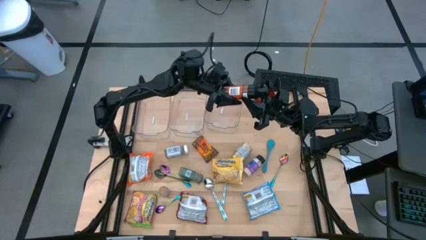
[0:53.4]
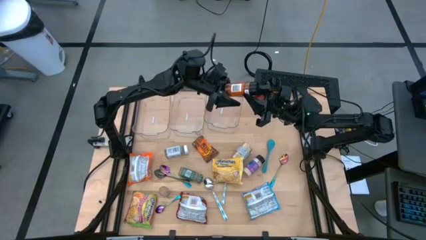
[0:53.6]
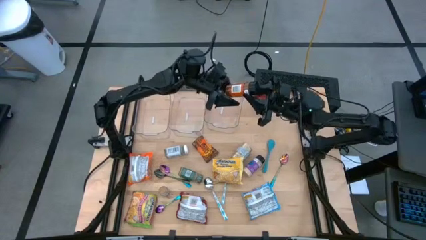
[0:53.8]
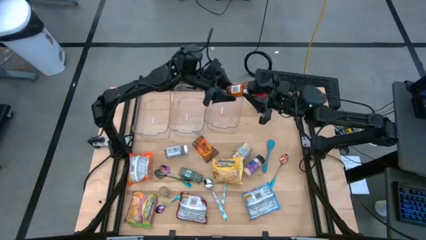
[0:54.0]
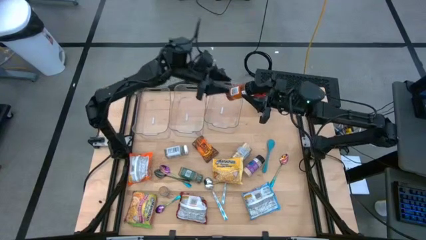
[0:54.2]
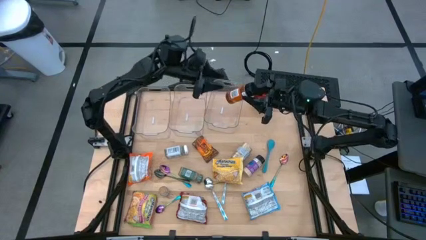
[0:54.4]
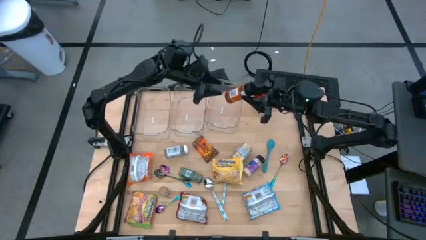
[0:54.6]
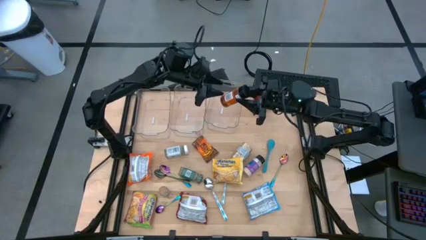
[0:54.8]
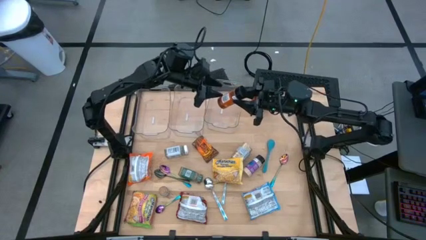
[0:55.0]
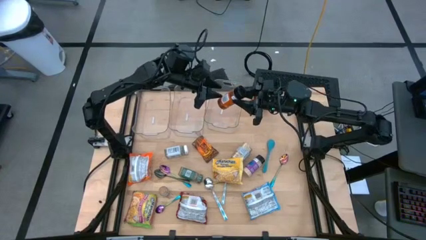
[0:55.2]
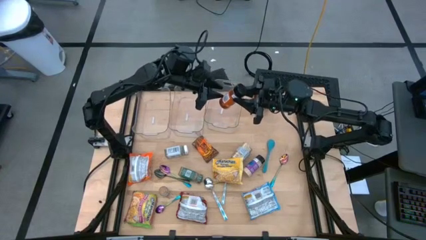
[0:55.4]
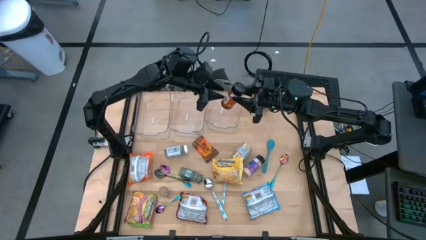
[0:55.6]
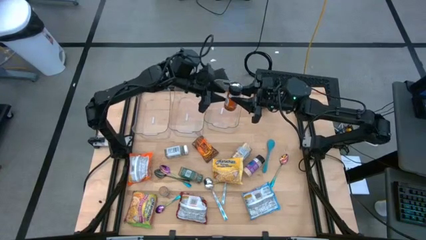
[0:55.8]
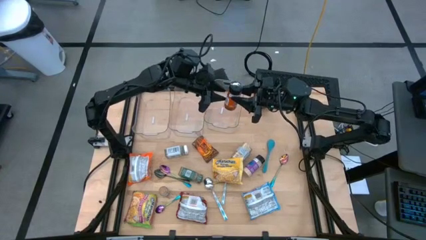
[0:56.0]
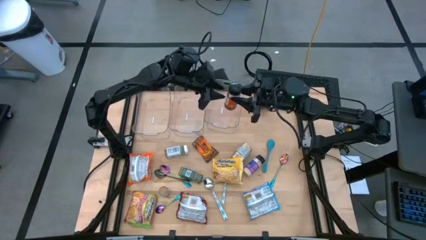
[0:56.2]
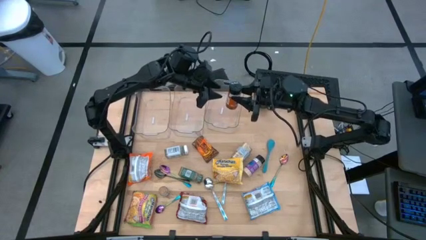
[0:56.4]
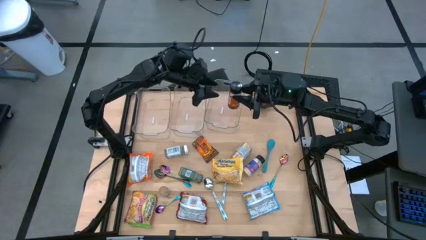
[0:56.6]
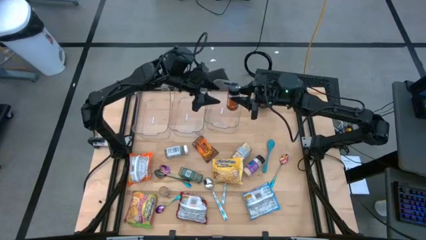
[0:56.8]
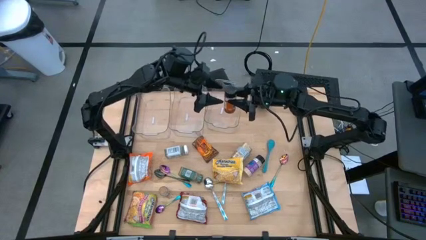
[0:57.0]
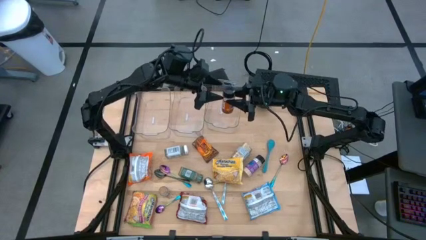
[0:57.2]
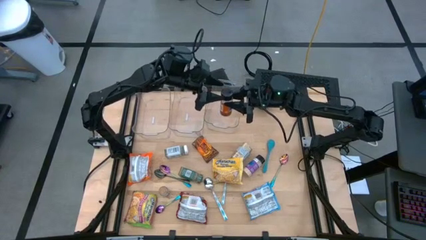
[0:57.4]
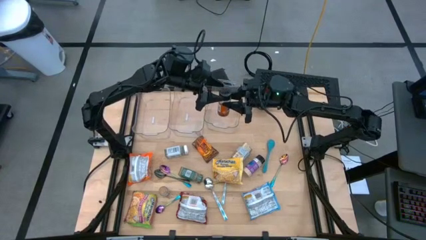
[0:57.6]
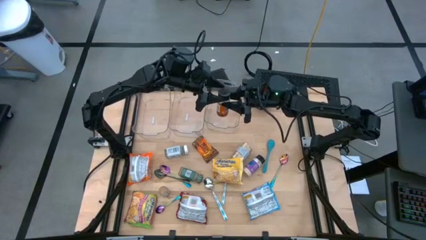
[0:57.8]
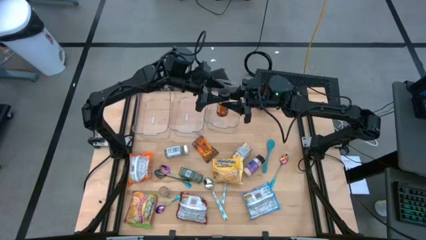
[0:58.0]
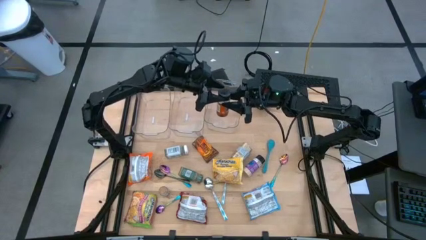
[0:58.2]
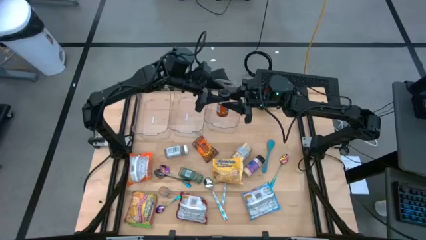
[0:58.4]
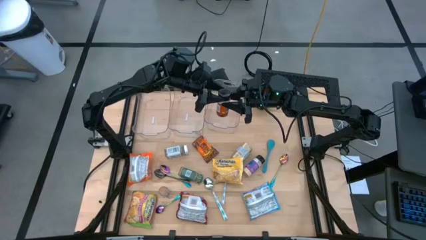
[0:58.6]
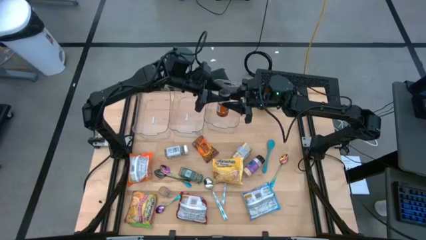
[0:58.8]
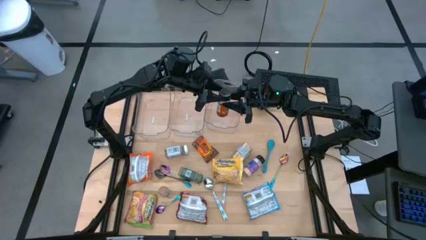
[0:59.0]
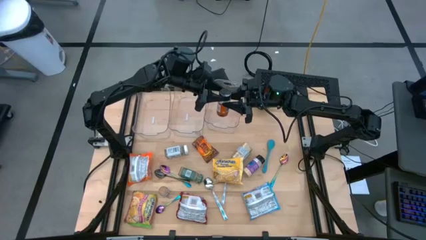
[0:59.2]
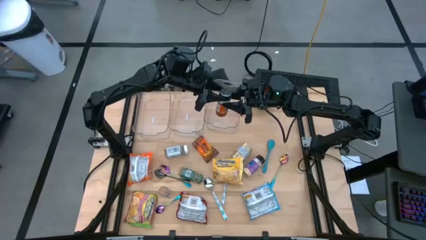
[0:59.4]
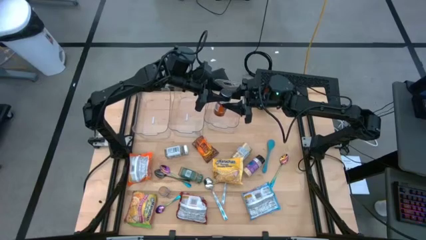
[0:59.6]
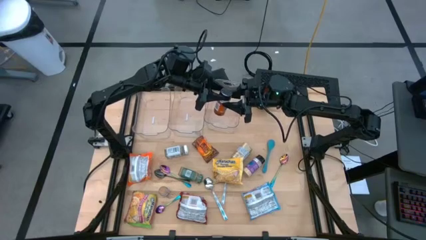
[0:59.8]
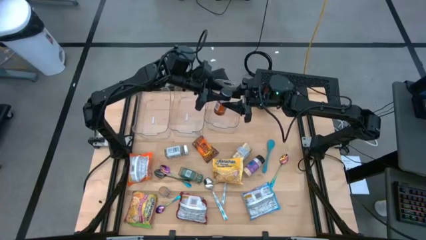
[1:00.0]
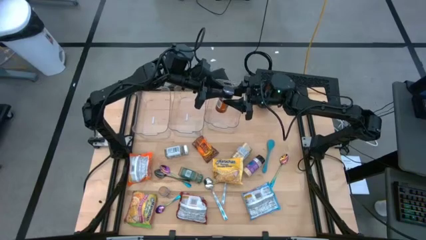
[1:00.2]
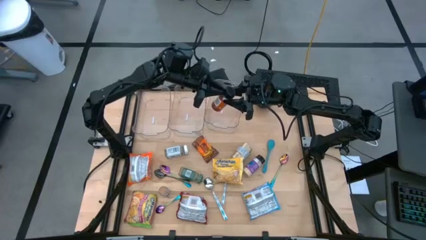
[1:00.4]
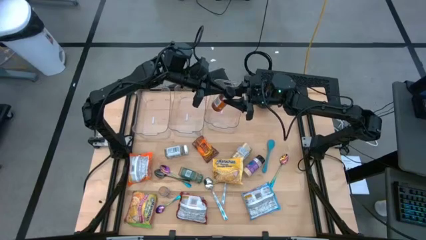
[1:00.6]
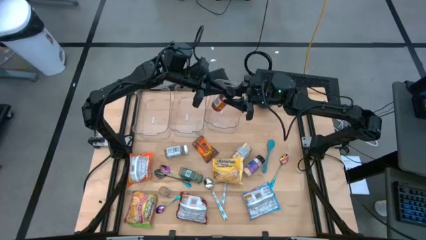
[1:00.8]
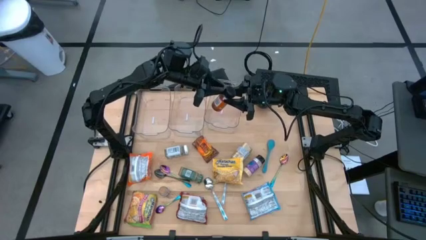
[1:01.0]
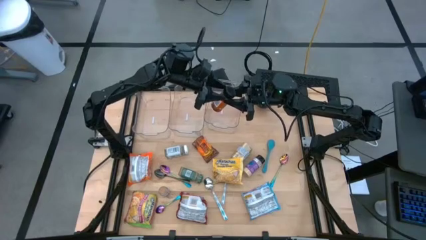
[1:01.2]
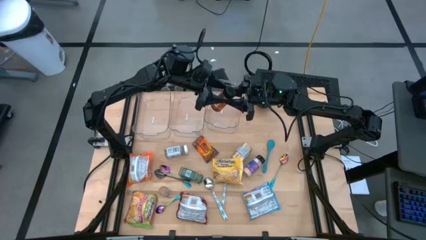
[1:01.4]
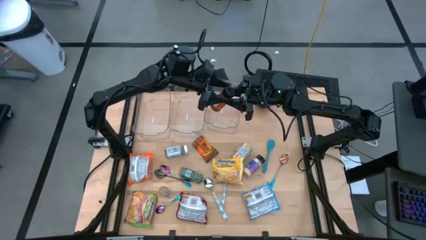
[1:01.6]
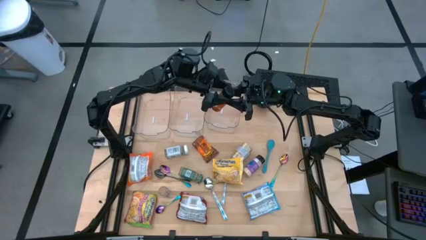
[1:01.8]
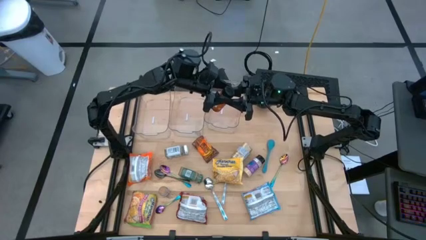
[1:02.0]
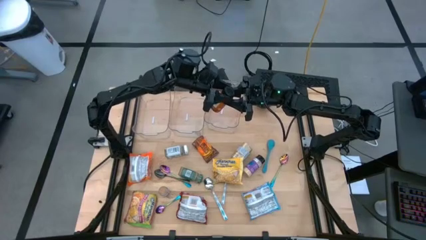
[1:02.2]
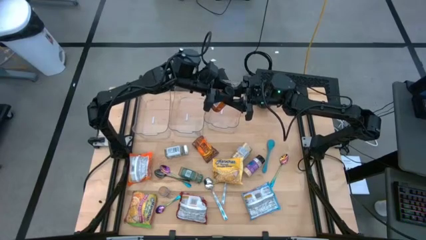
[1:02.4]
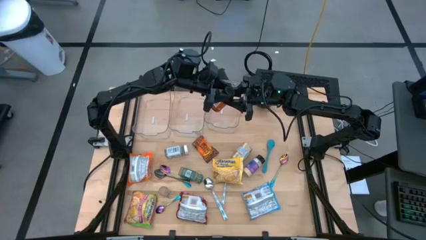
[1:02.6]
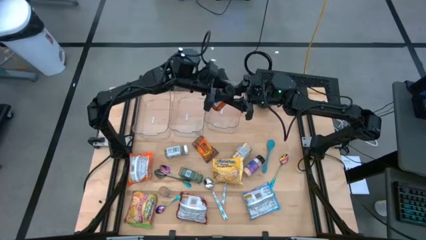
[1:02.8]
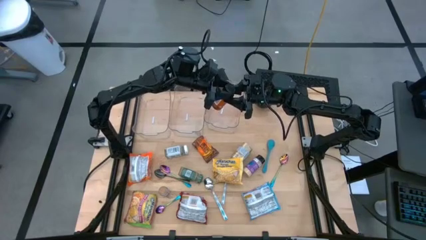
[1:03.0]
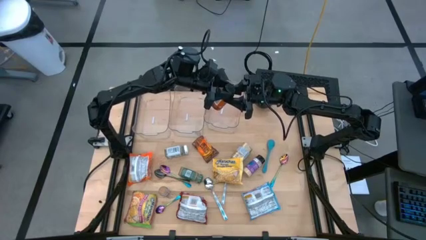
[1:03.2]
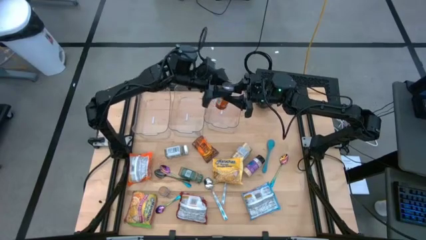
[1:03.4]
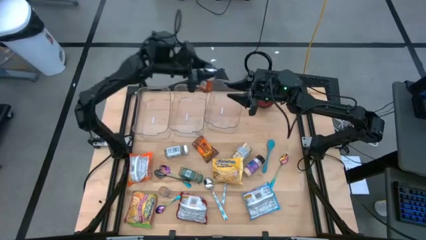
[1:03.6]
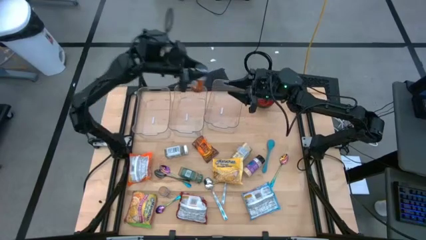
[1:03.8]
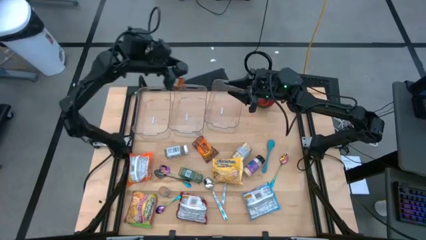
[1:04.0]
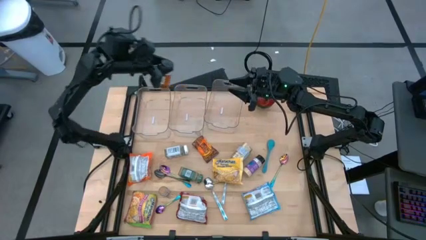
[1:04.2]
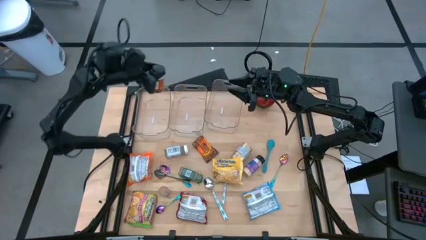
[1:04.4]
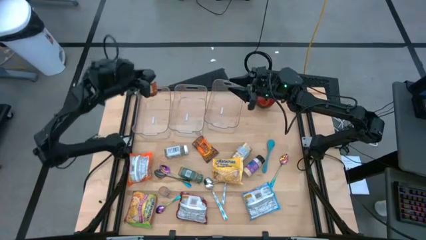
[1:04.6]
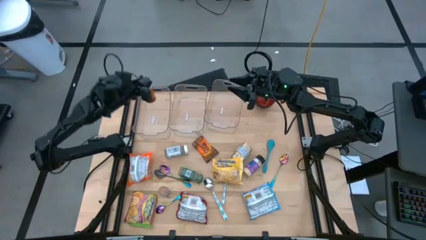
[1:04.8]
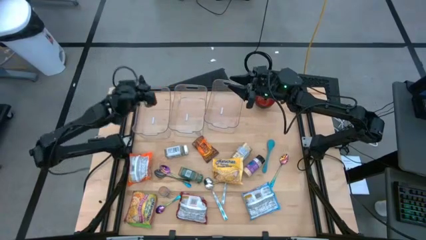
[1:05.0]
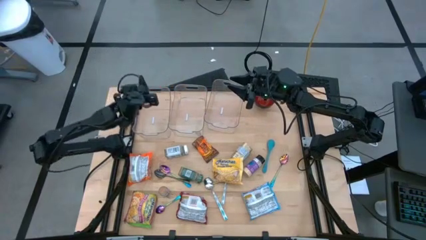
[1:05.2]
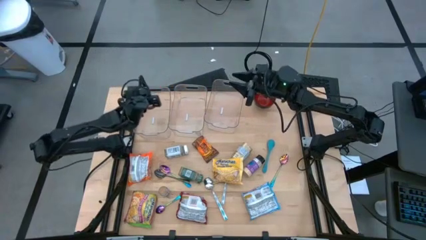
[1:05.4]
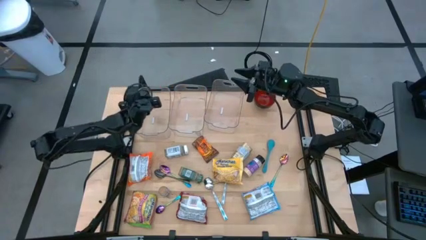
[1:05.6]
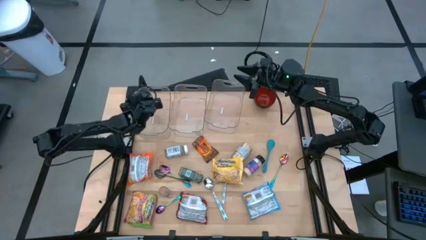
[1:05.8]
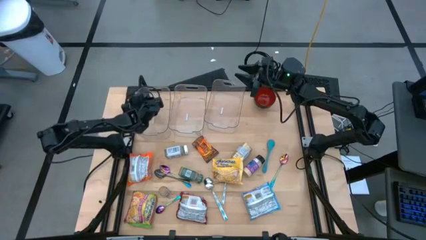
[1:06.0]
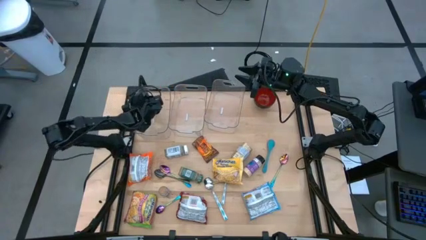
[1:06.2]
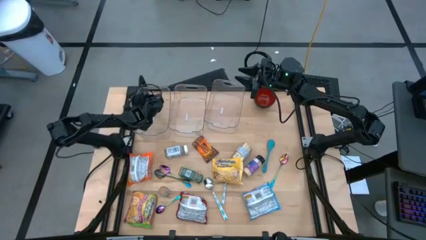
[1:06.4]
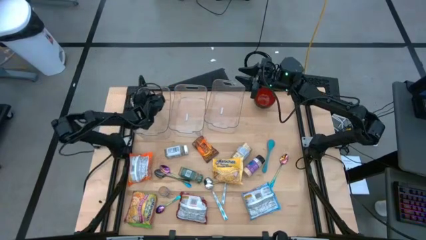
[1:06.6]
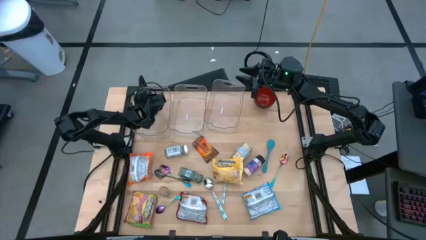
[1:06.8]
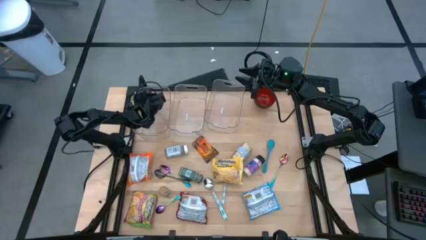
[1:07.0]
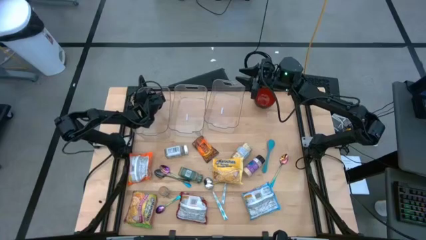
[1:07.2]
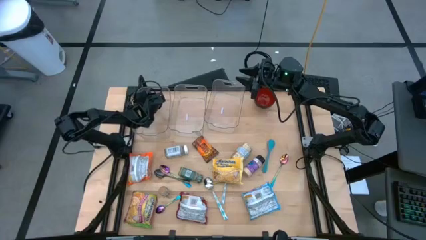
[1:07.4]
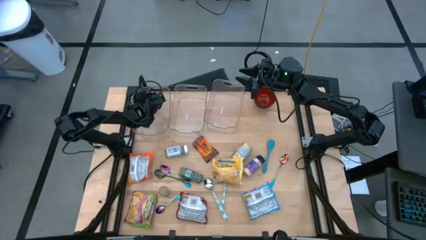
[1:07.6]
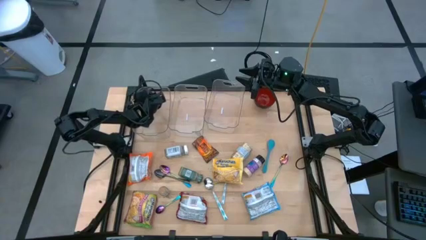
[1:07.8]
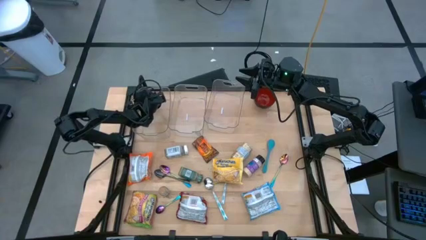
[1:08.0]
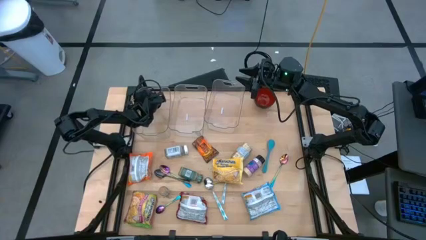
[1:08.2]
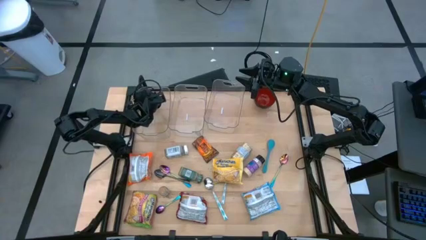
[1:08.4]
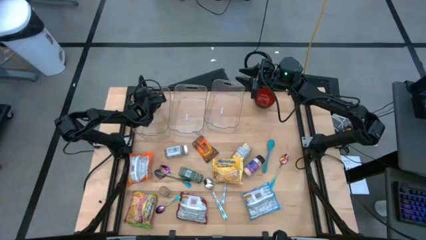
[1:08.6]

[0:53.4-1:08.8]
Task: Pick & Place Food Item
Adjust the orange spice bottle in the left transparent bin
